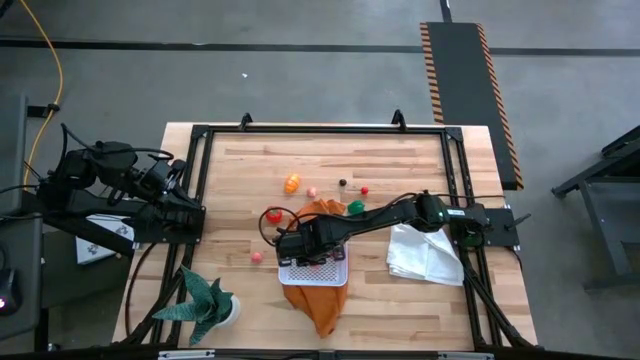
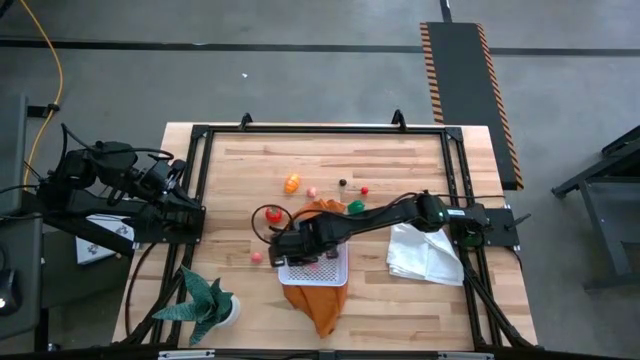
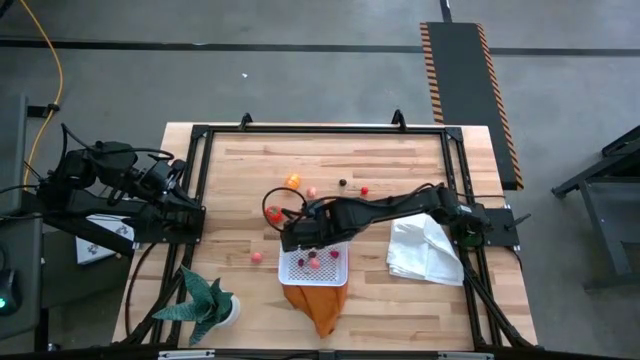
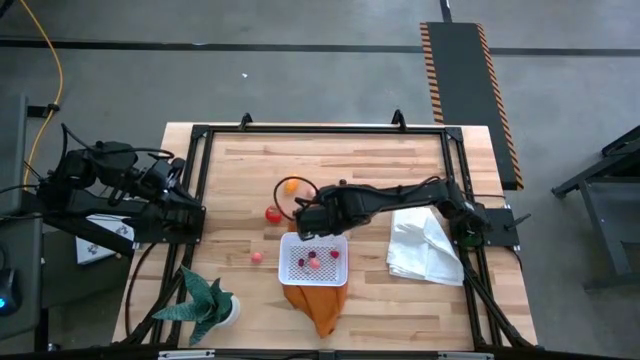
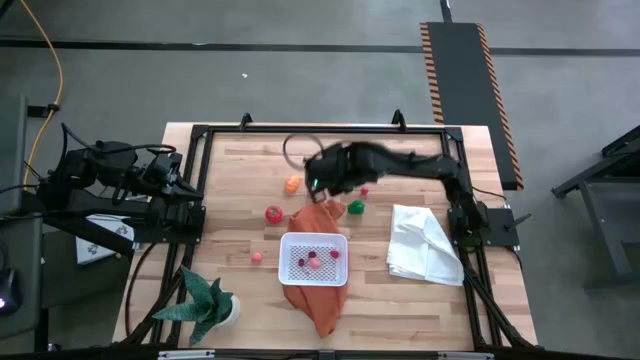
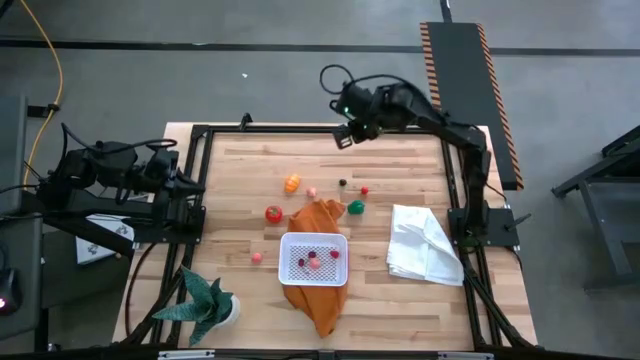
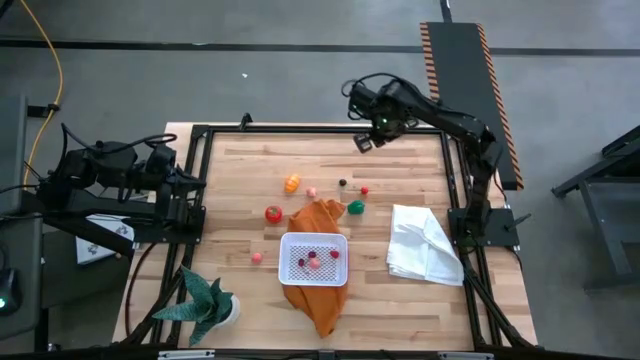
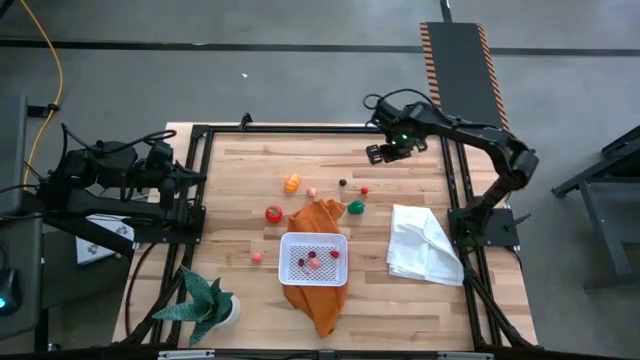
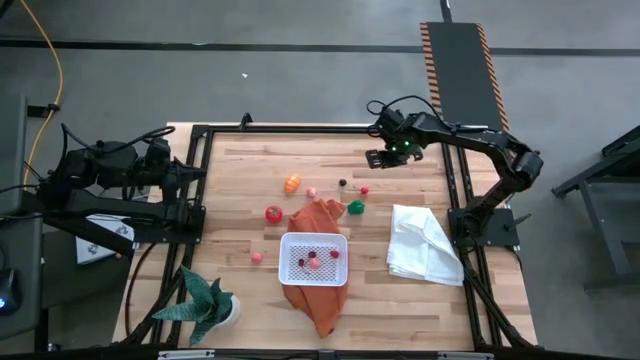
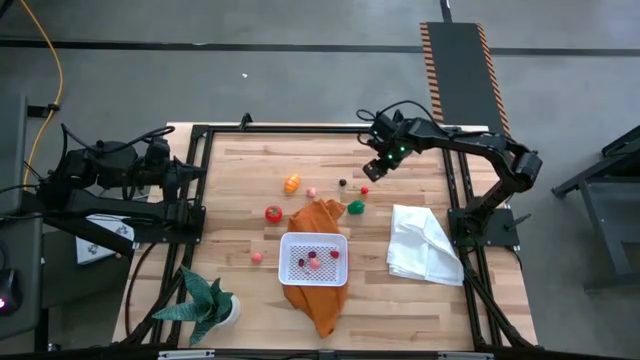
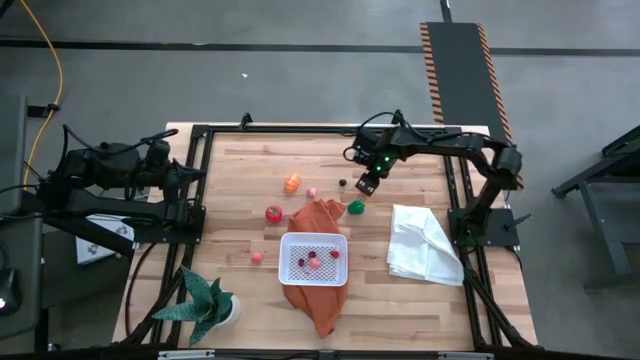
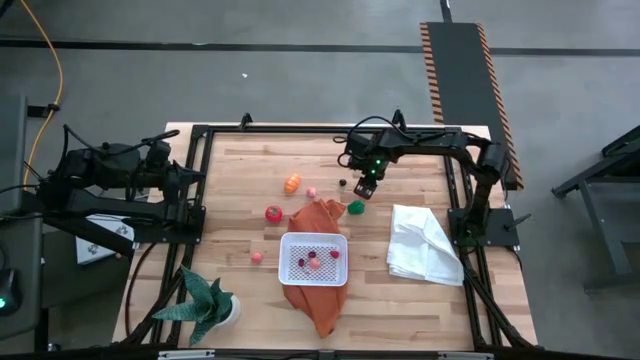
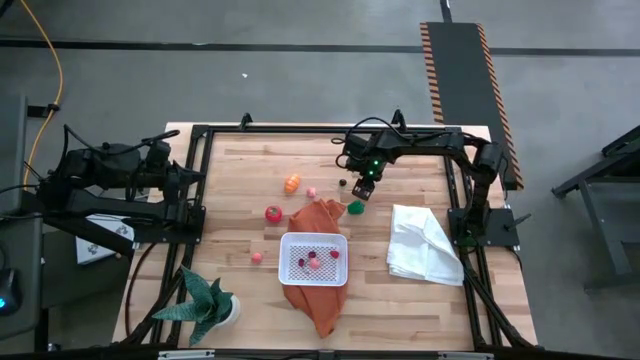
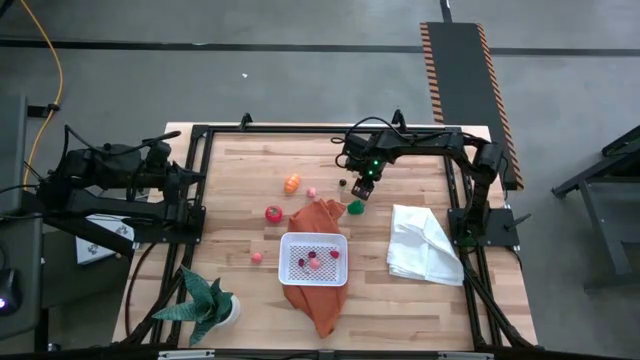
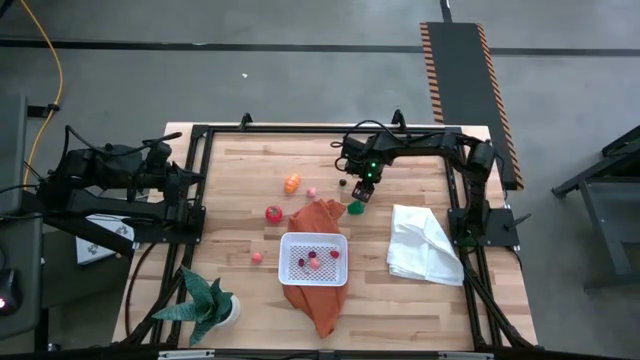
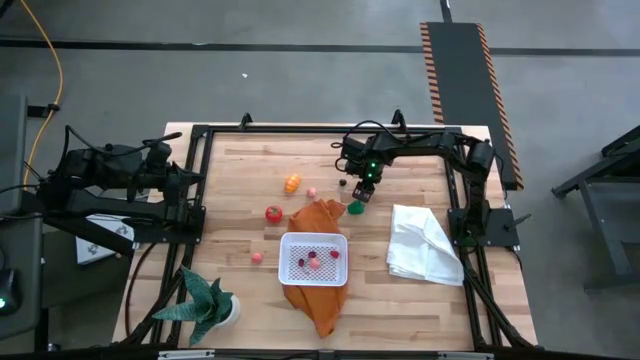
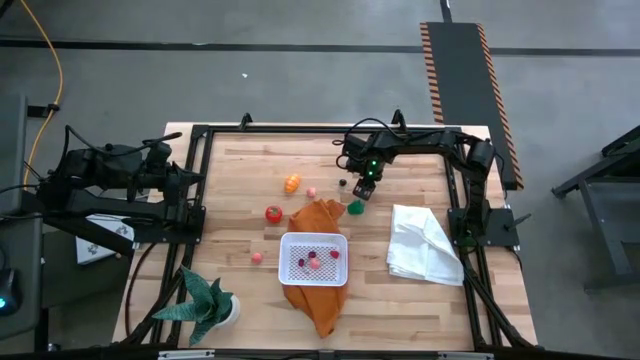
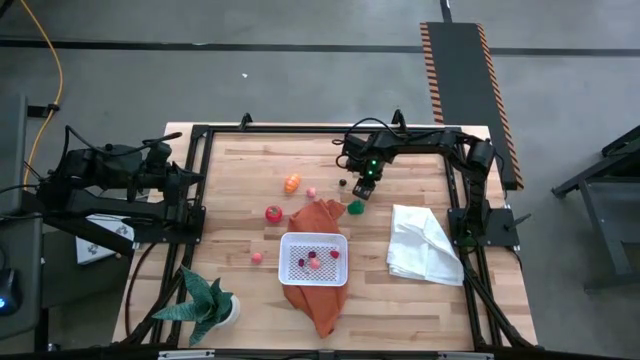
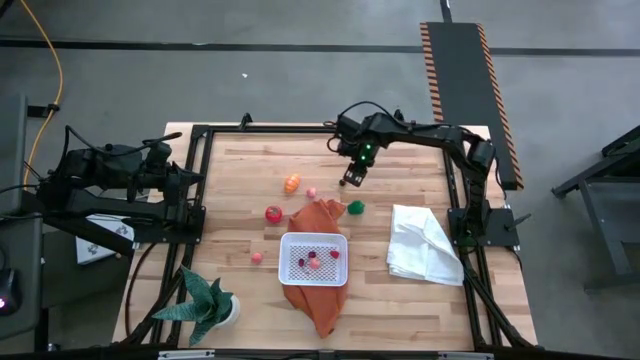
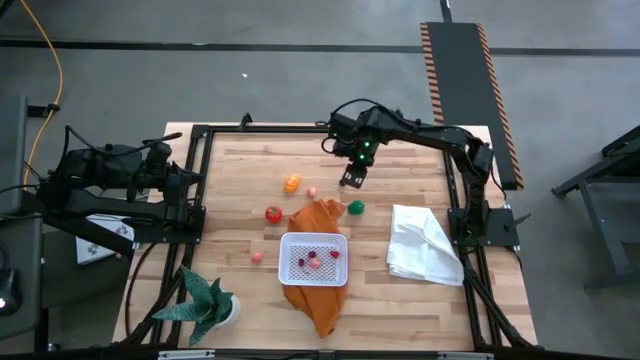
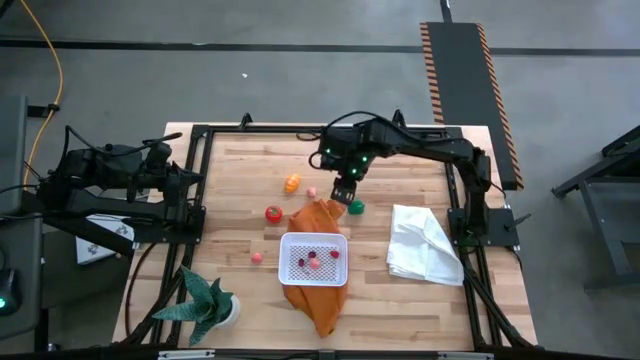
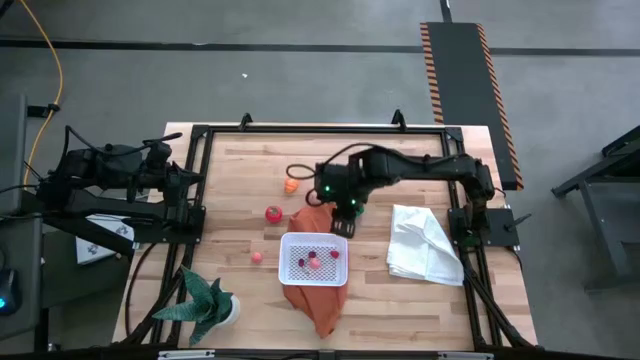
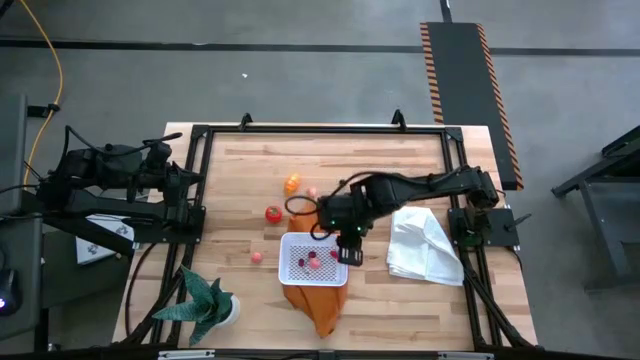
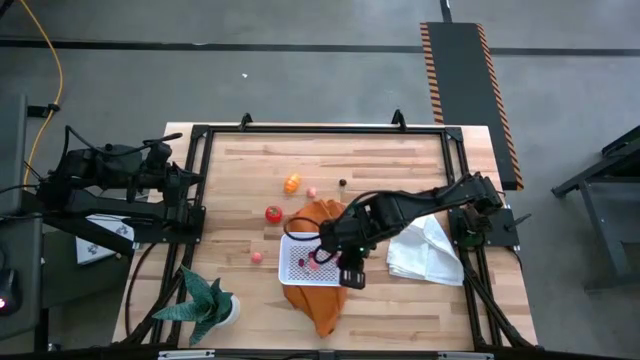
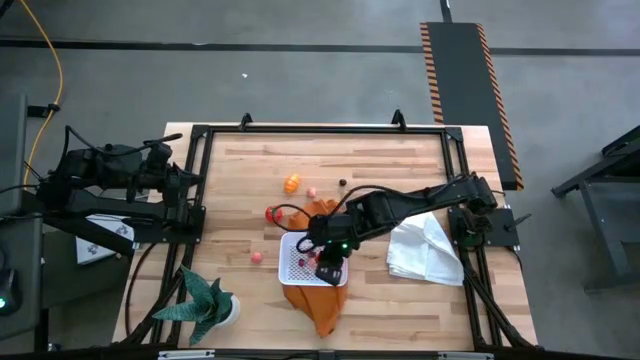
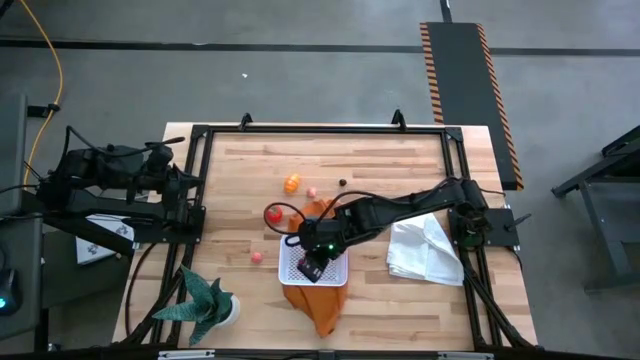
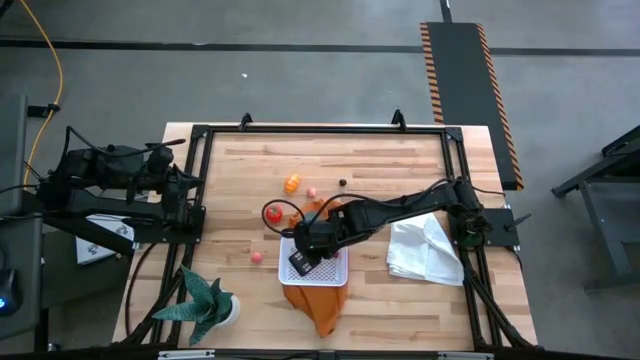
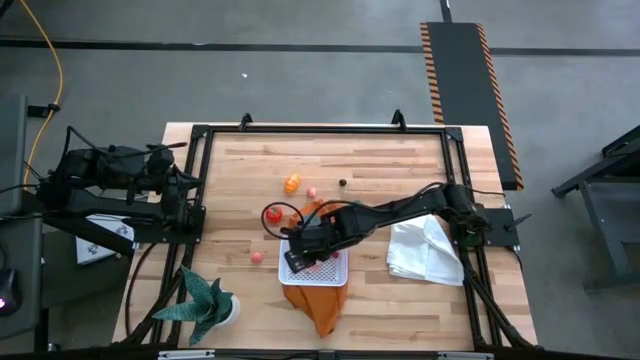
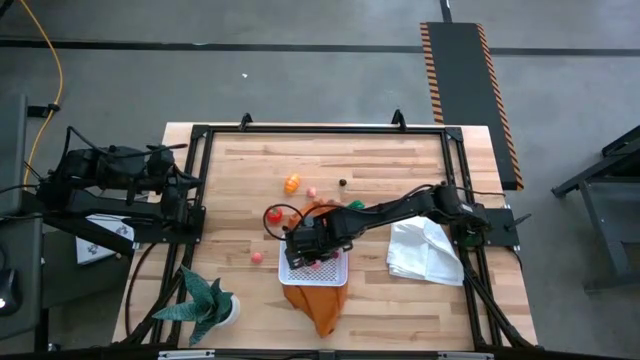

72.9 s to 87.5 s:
Task: Pick and placing Produce into tupperware
Put the red cherry into the white basket
